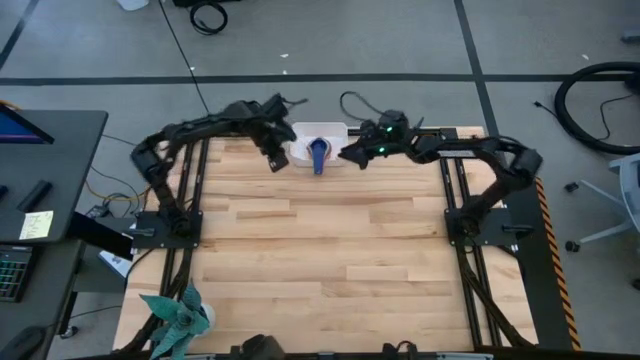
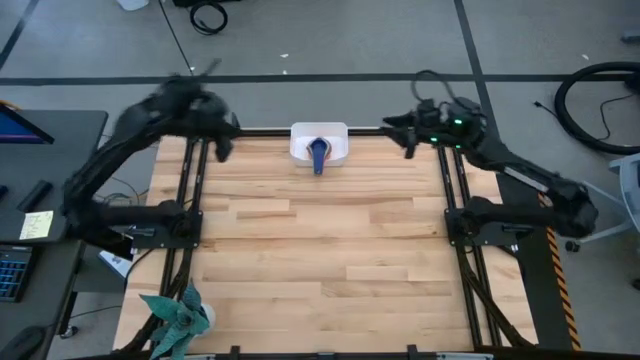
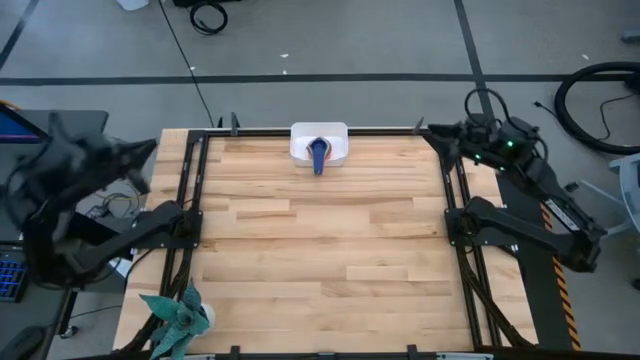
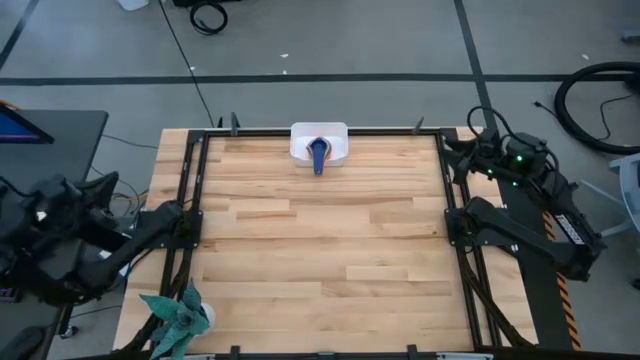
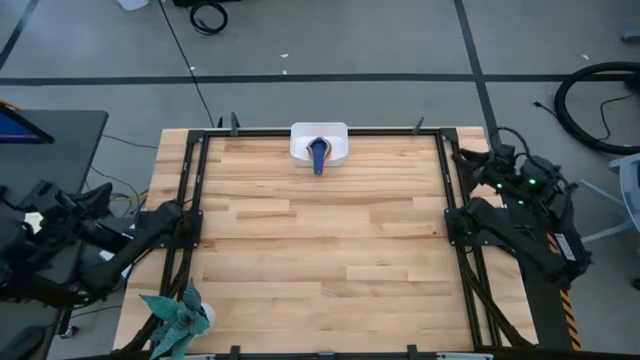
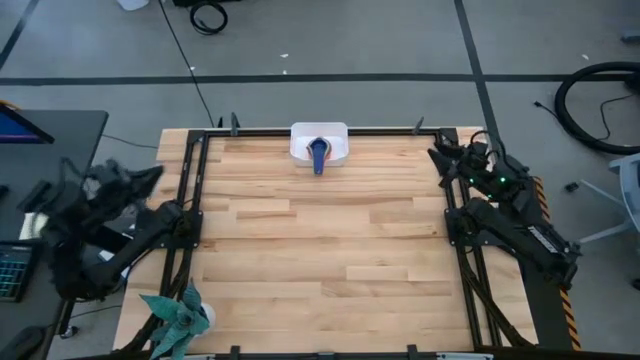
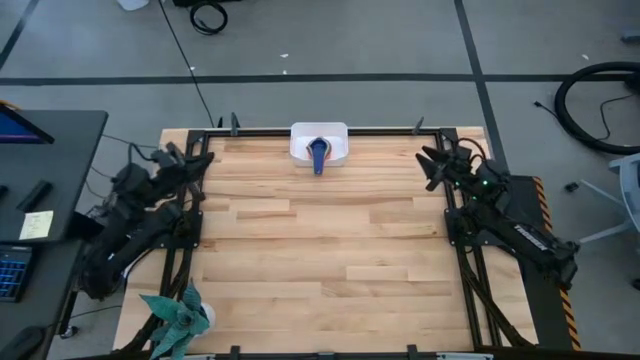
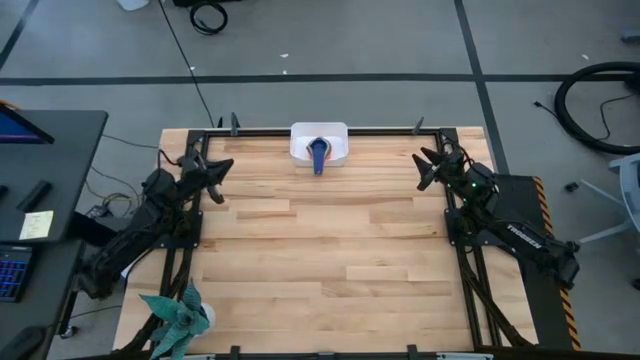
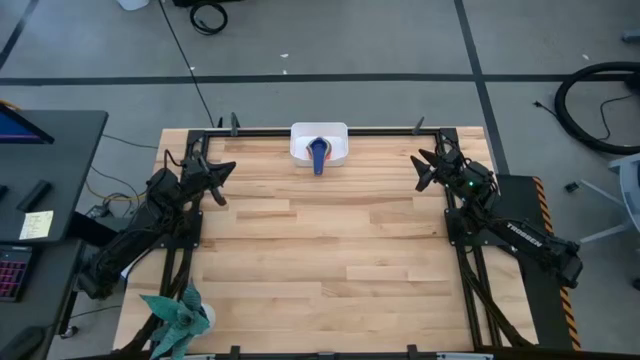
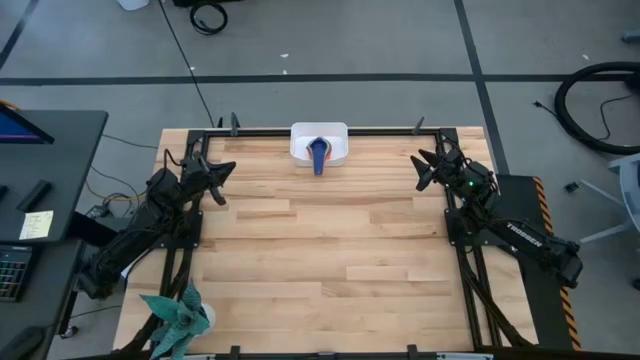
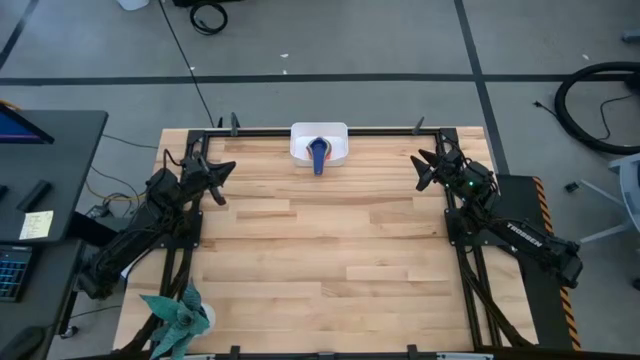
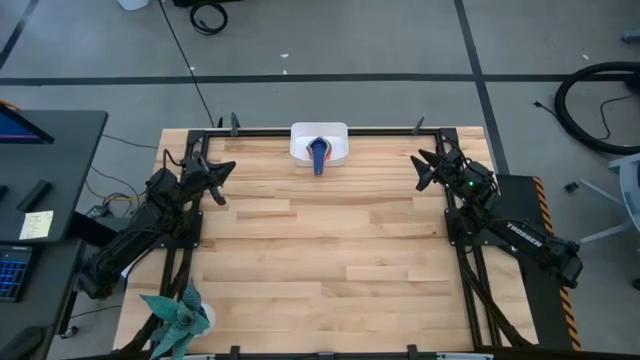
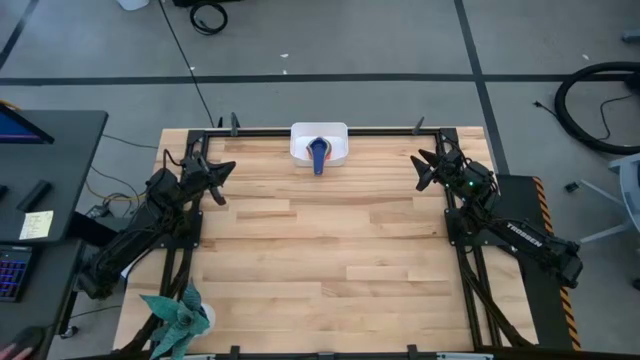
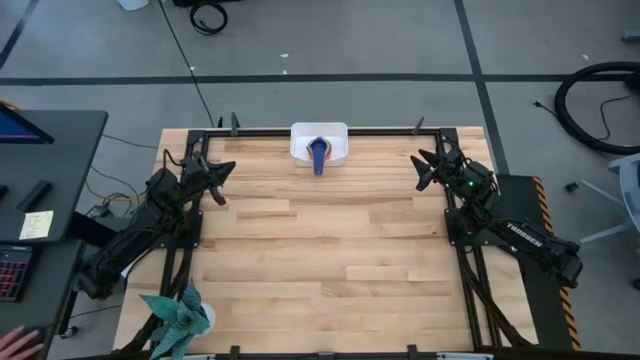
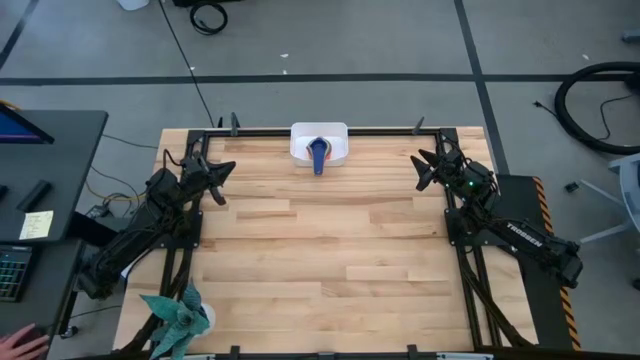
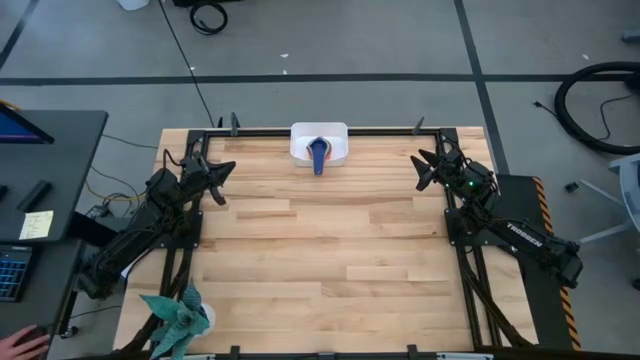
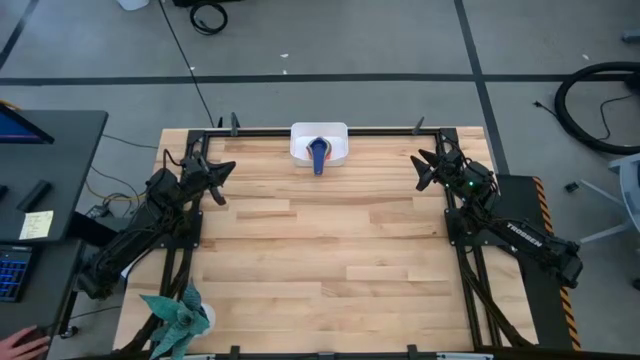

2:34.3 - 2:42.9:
Task: Nest measuring cups in basket
Return to Home Position

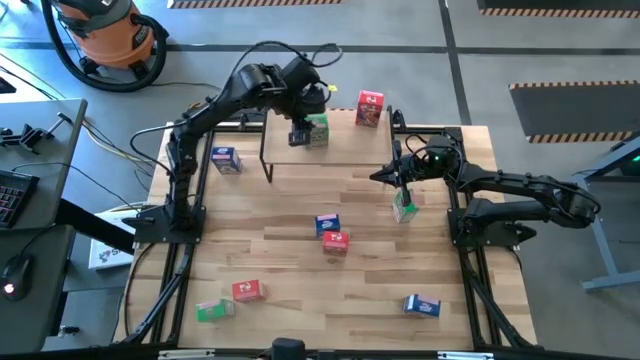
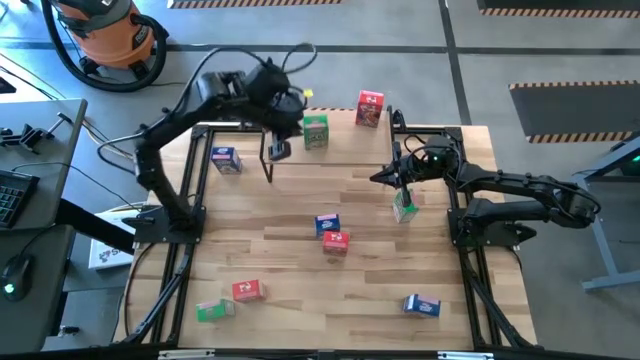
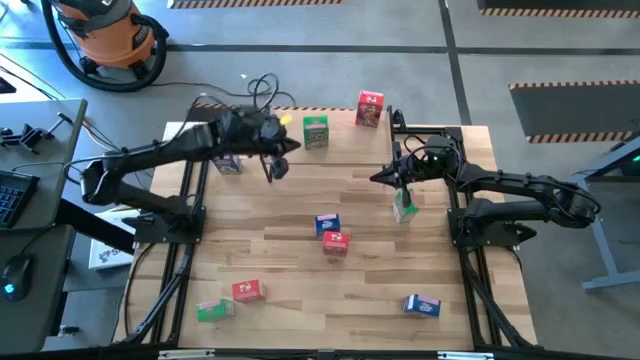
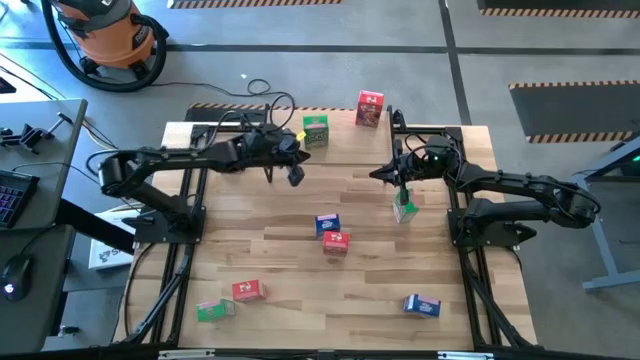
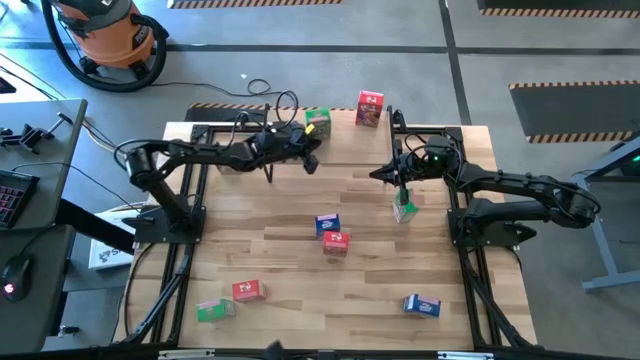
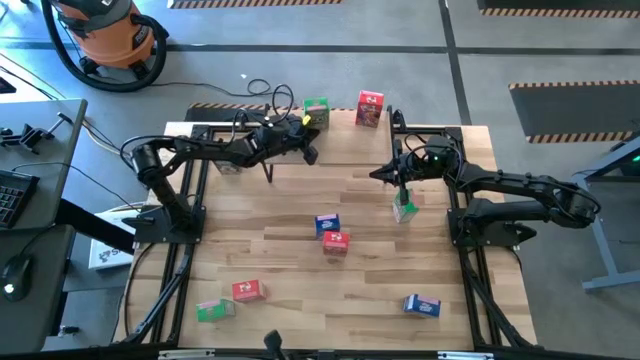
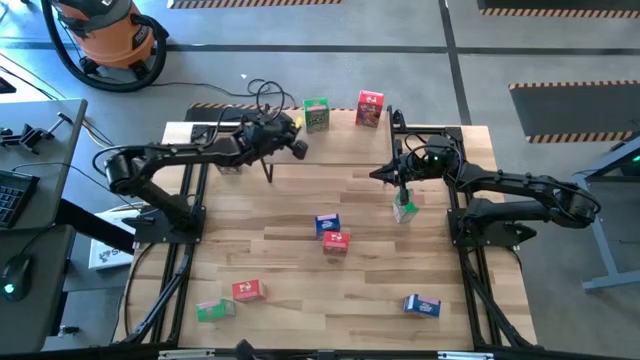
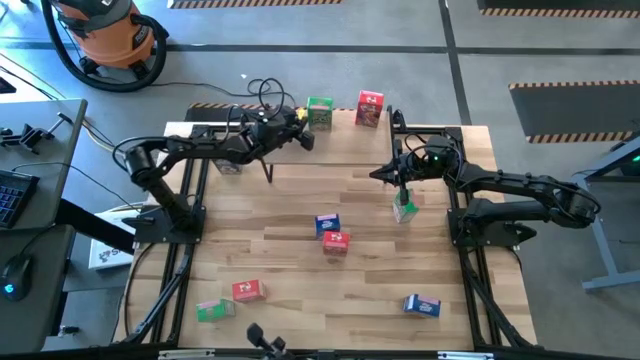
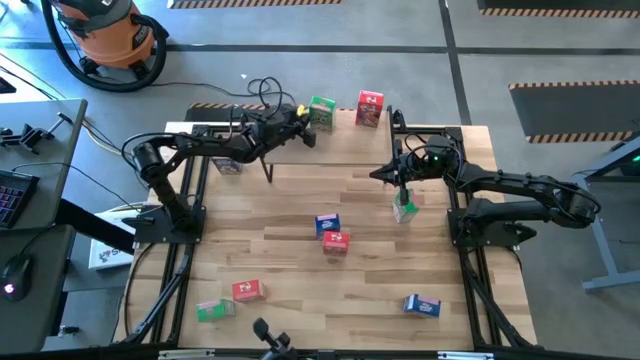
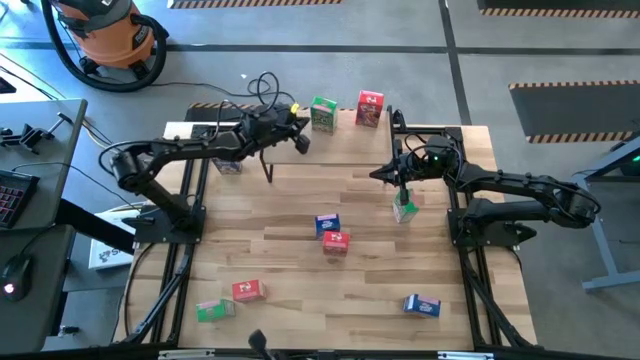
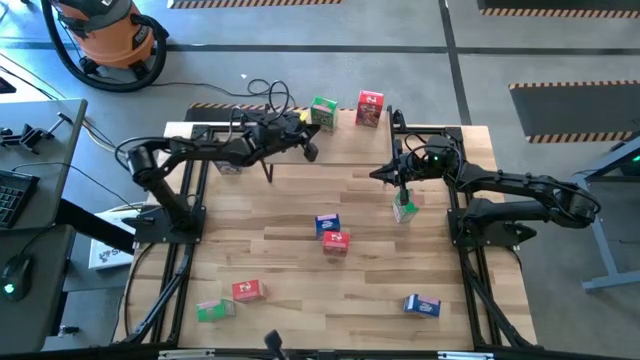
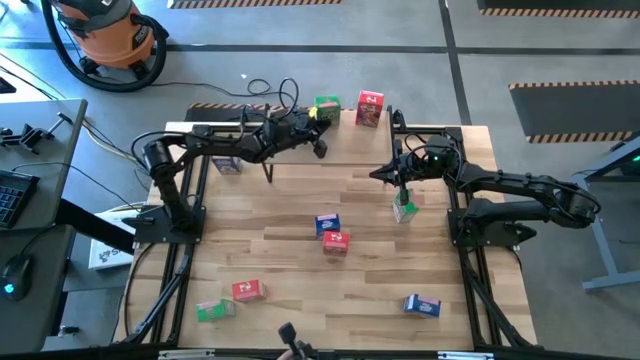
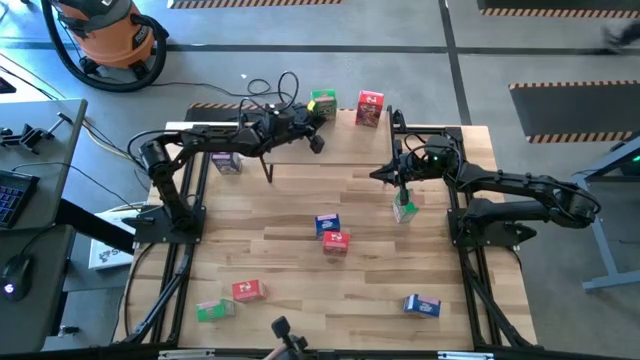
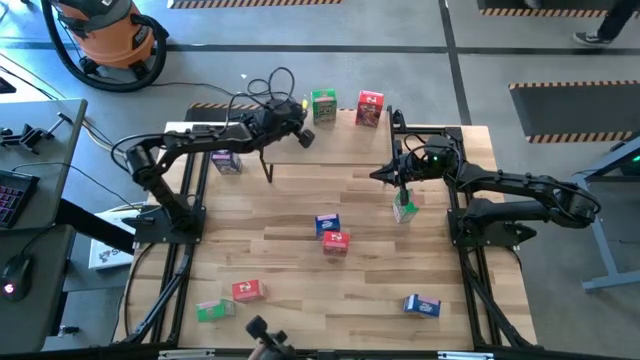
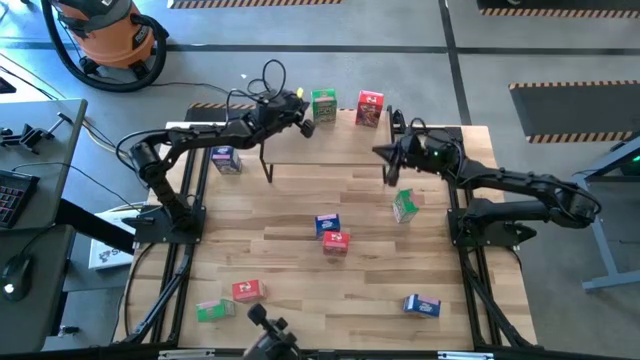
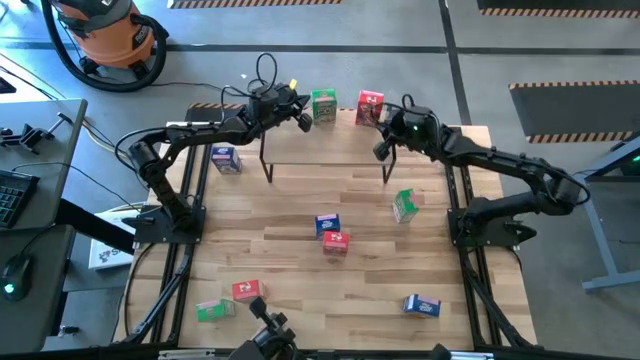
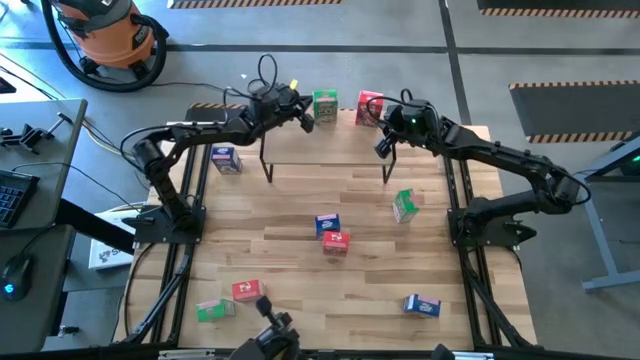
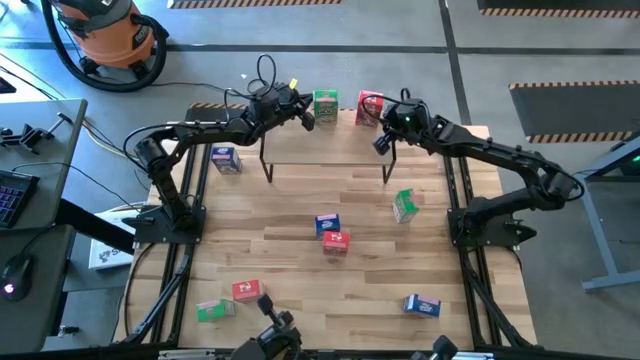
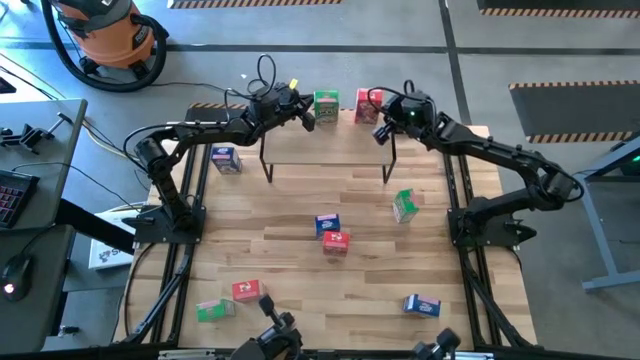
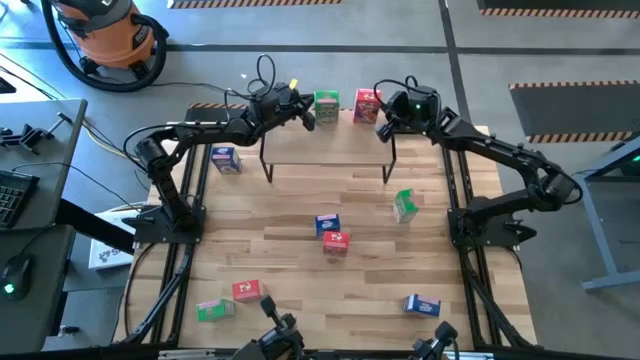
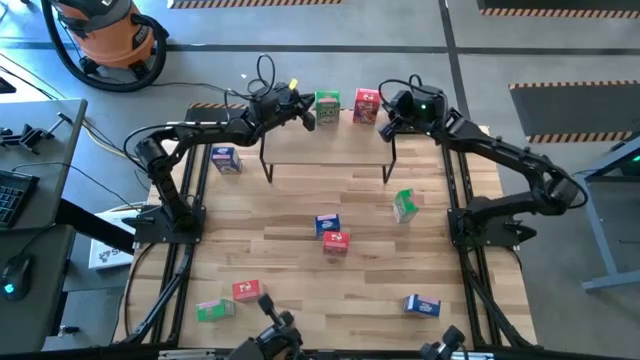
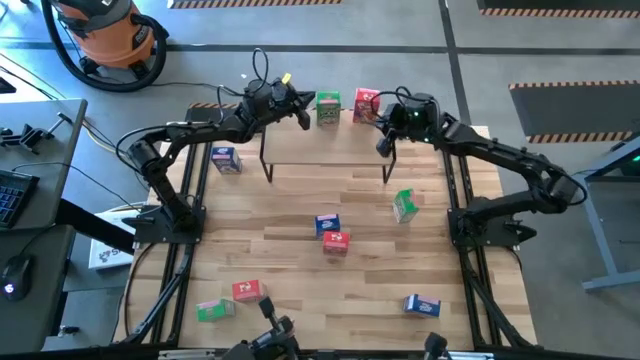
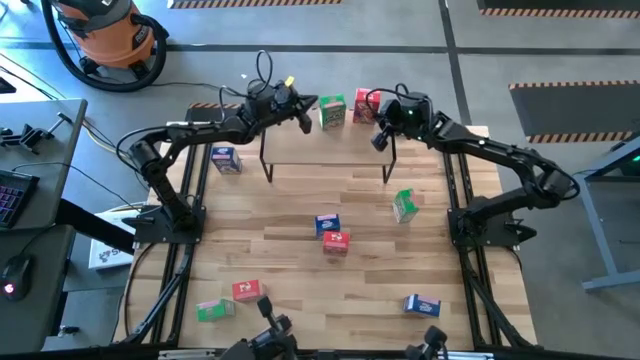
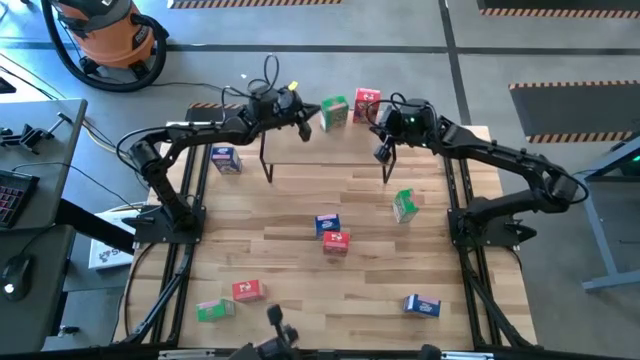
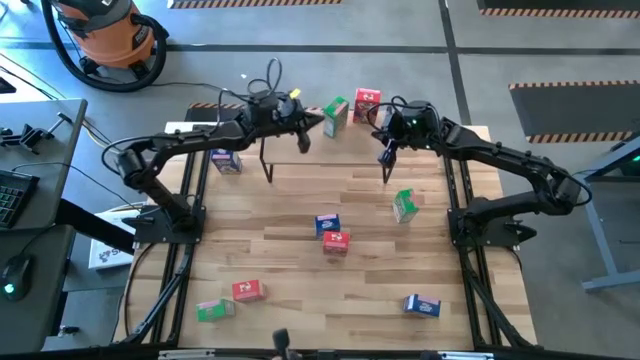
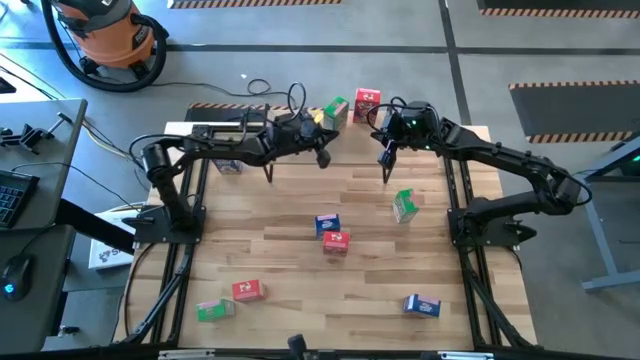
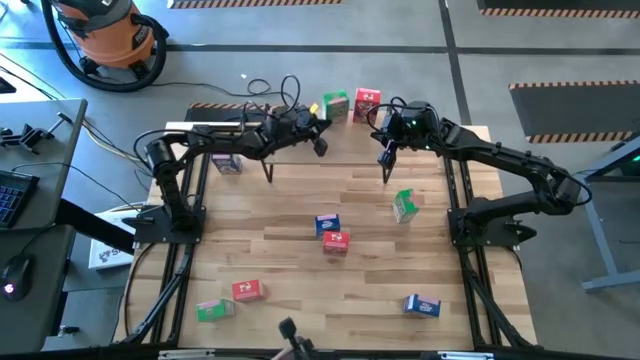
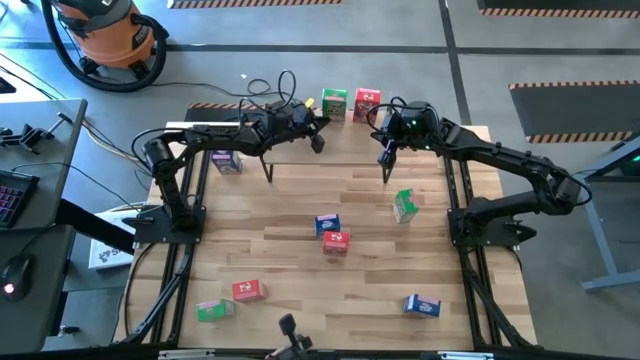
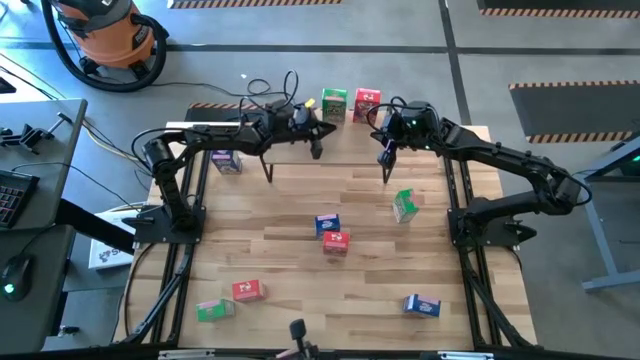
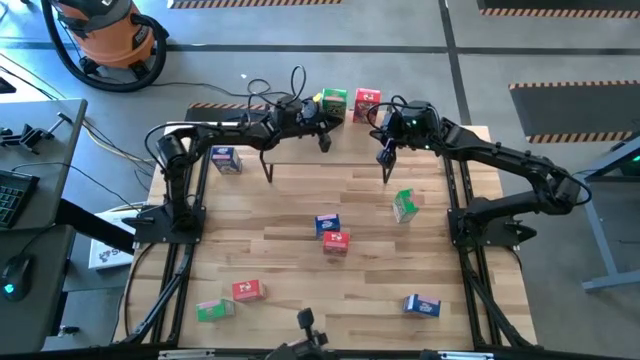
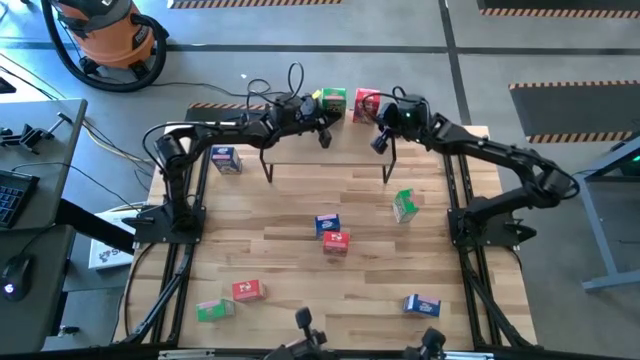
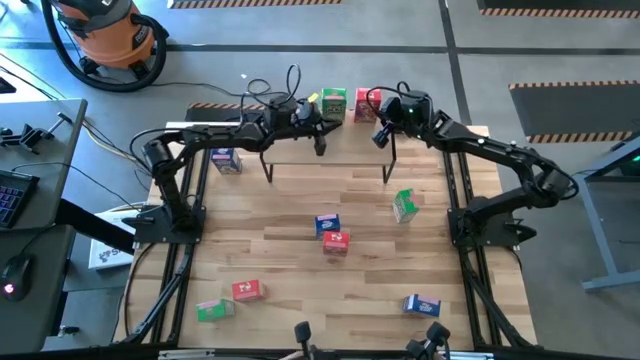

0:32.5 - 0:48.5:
Task: Stack cereal on shelf
Adjust the green and red cereal box on the shelf
